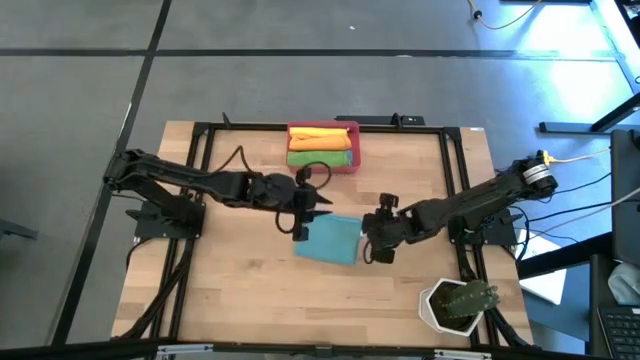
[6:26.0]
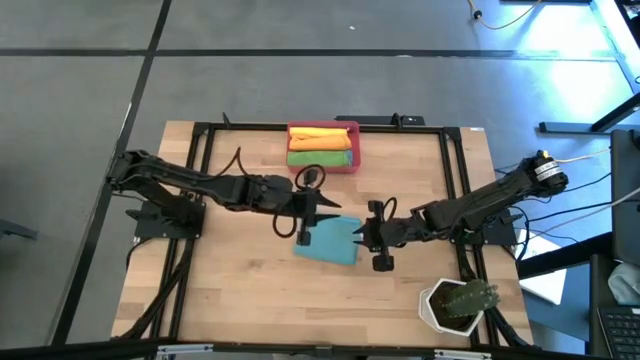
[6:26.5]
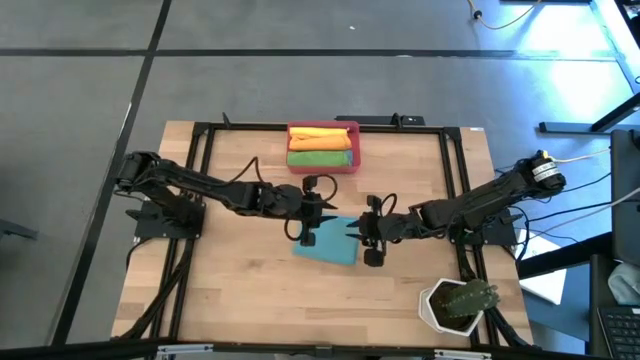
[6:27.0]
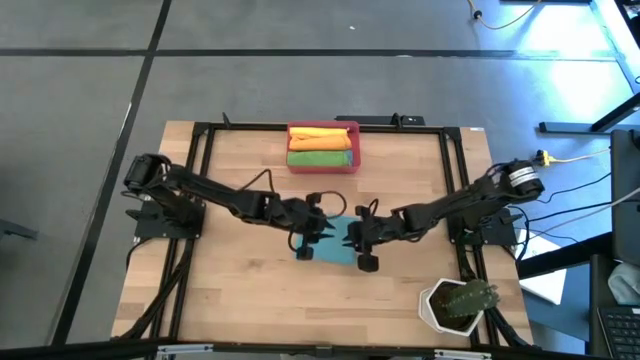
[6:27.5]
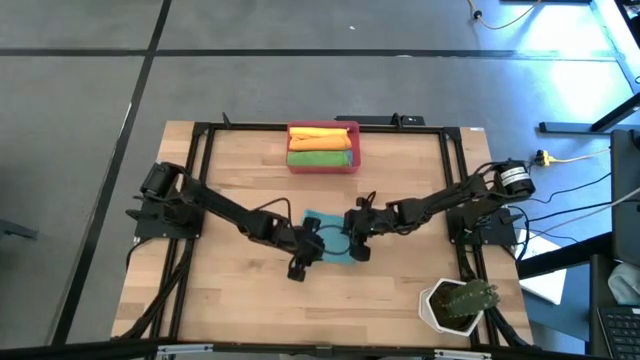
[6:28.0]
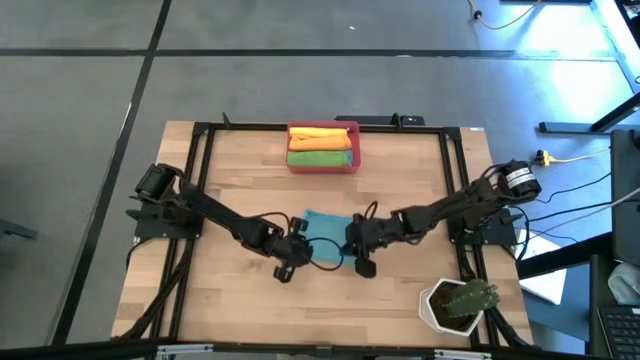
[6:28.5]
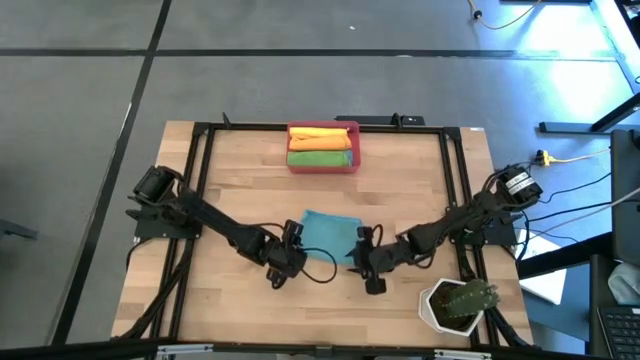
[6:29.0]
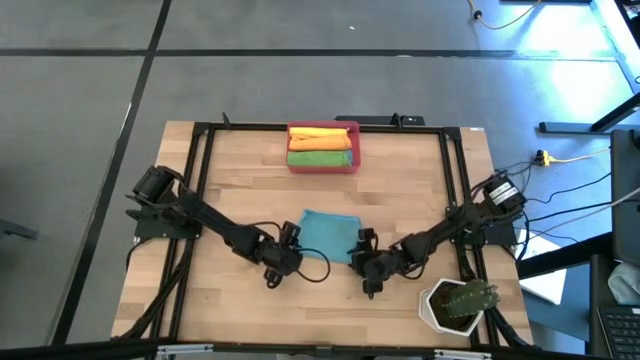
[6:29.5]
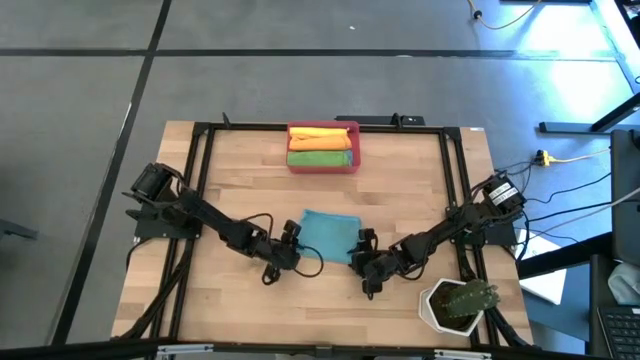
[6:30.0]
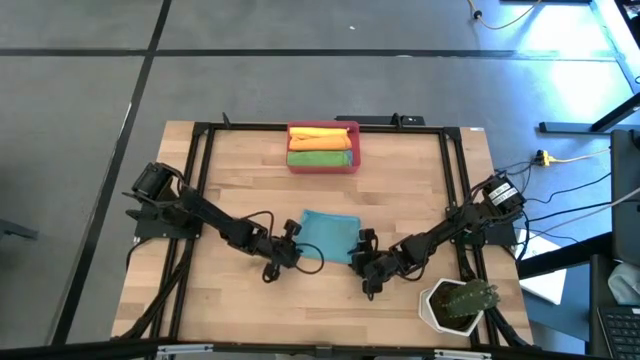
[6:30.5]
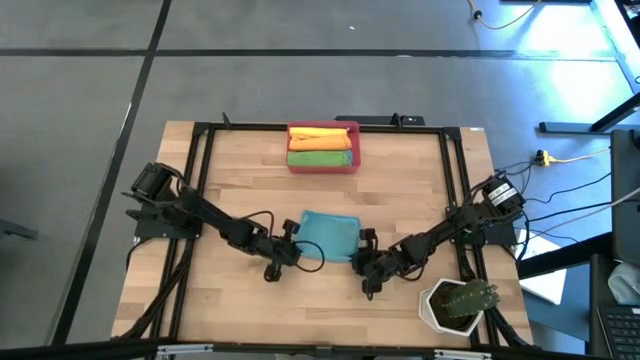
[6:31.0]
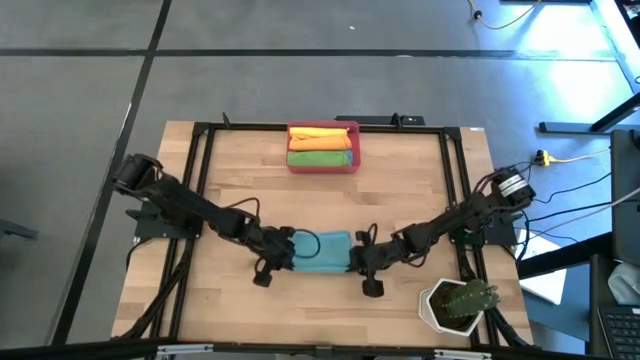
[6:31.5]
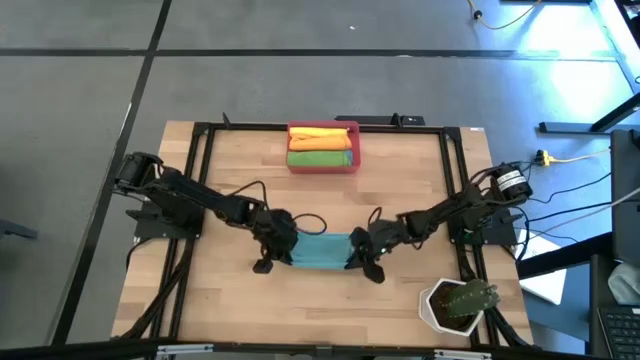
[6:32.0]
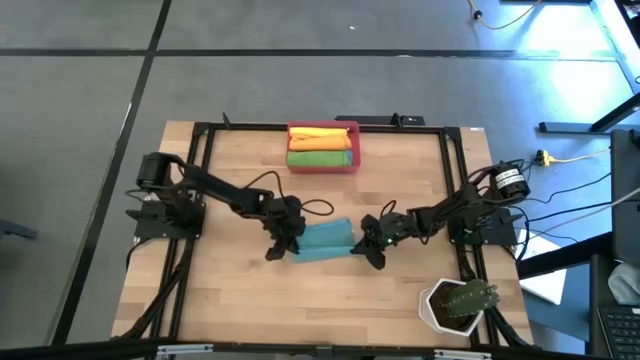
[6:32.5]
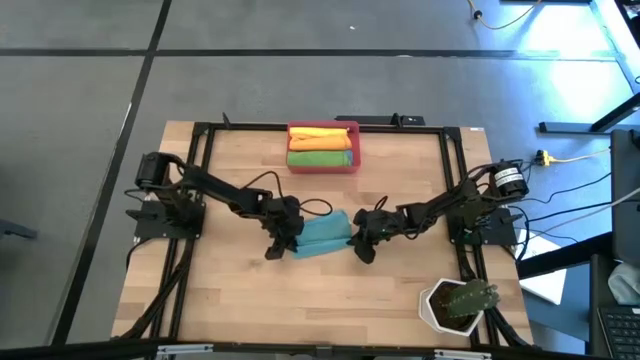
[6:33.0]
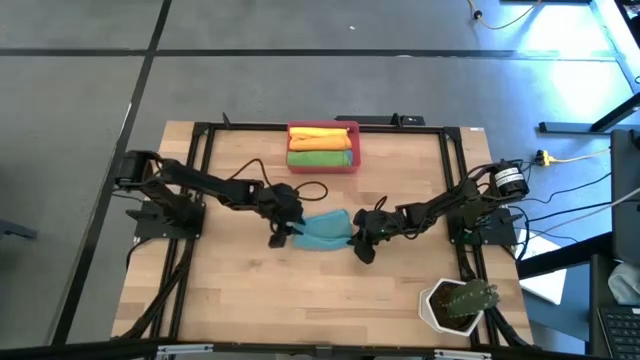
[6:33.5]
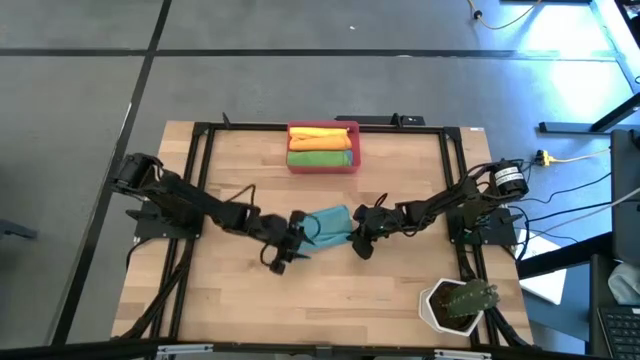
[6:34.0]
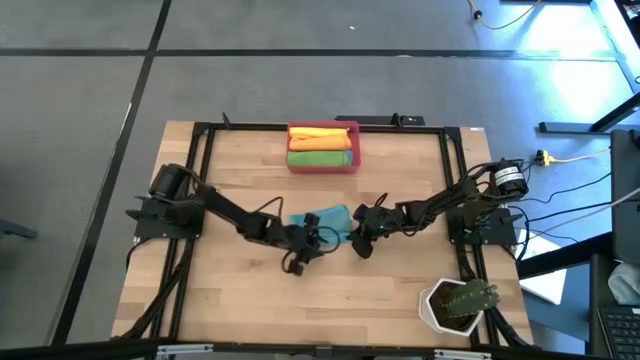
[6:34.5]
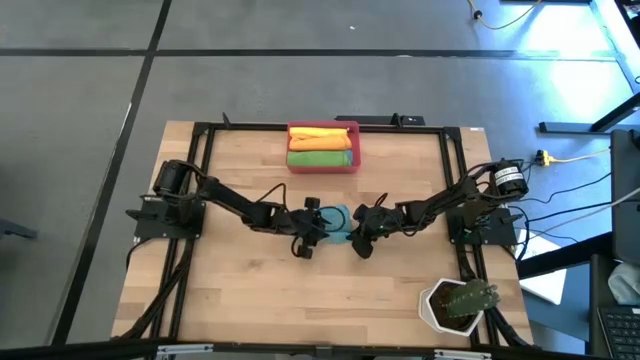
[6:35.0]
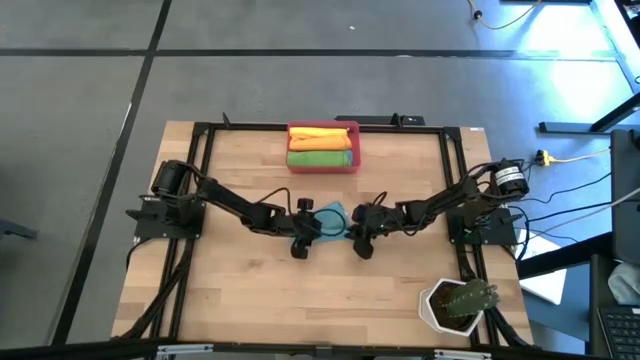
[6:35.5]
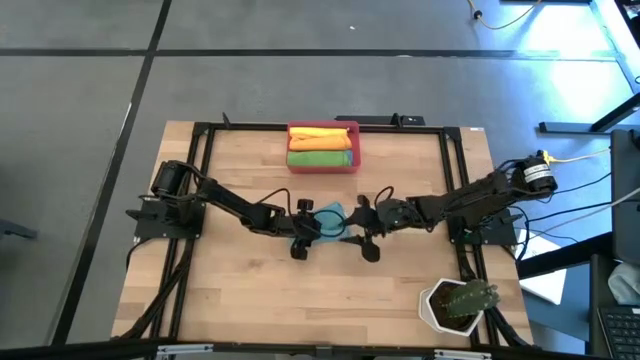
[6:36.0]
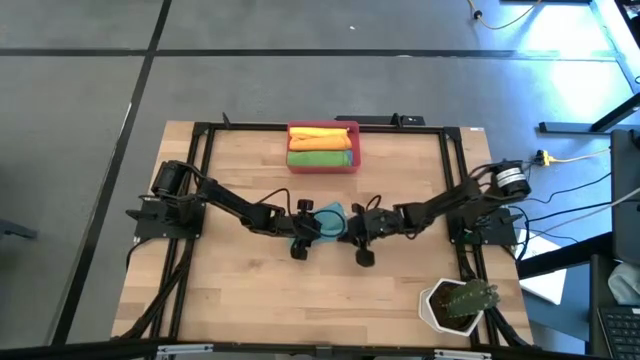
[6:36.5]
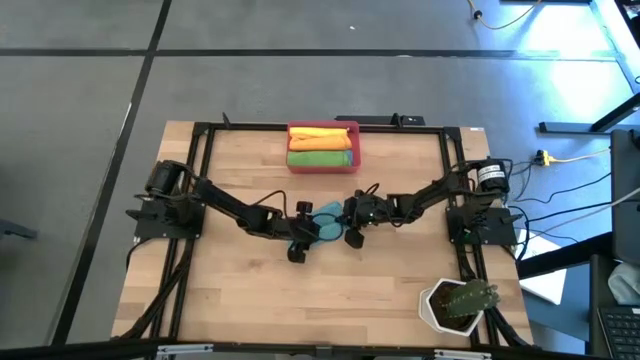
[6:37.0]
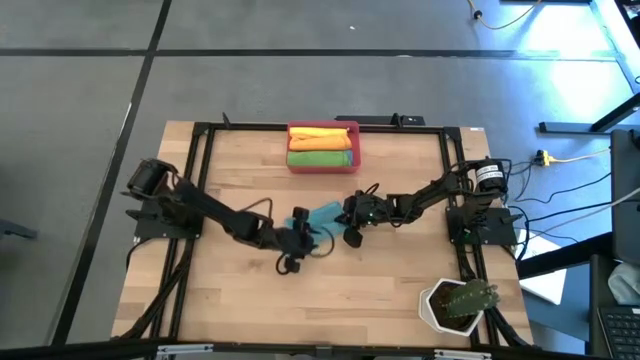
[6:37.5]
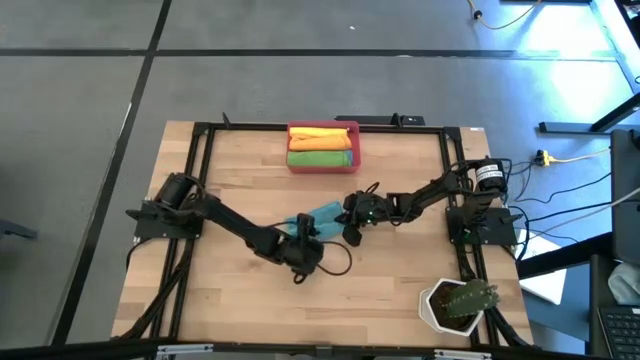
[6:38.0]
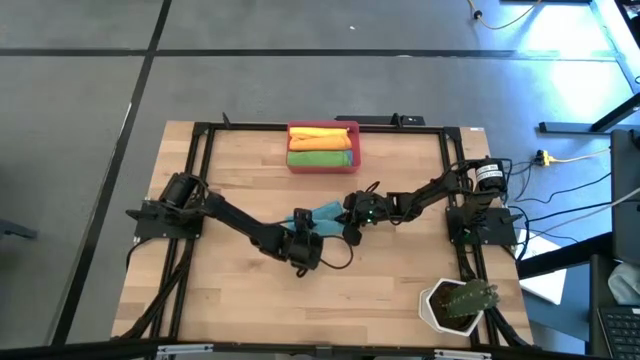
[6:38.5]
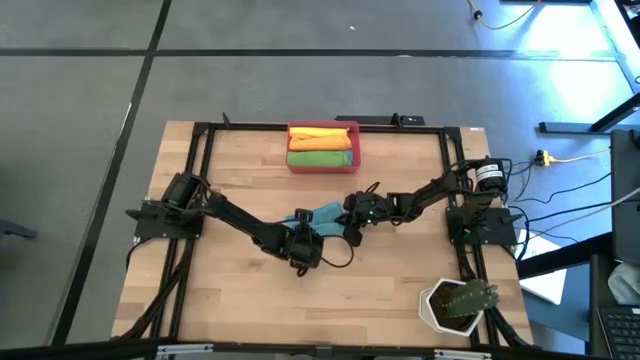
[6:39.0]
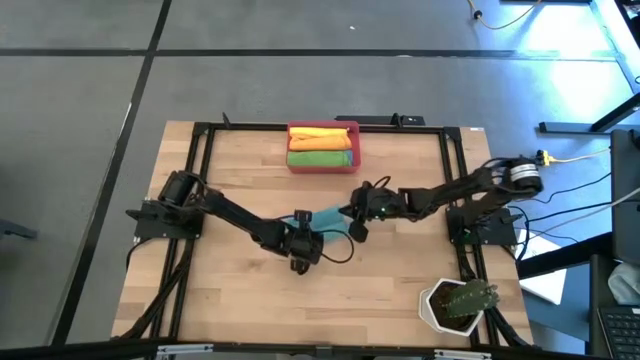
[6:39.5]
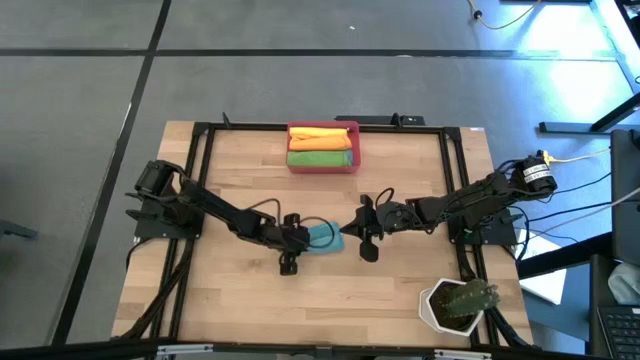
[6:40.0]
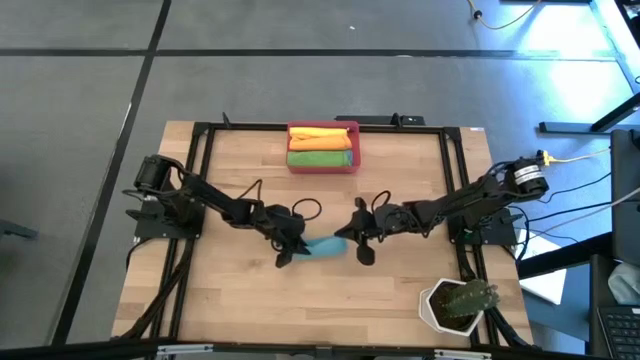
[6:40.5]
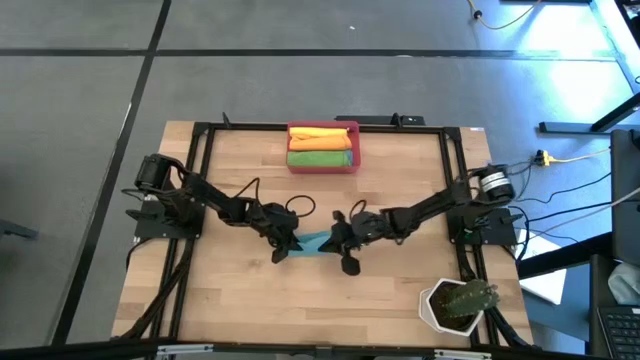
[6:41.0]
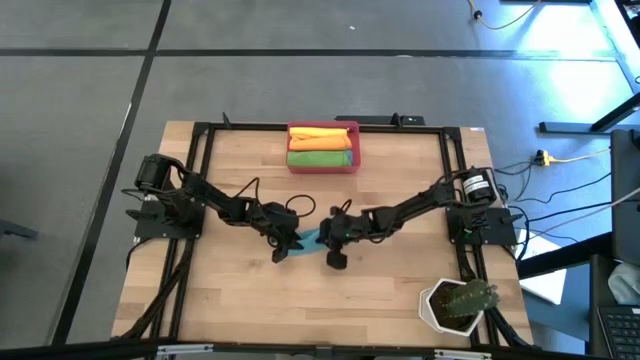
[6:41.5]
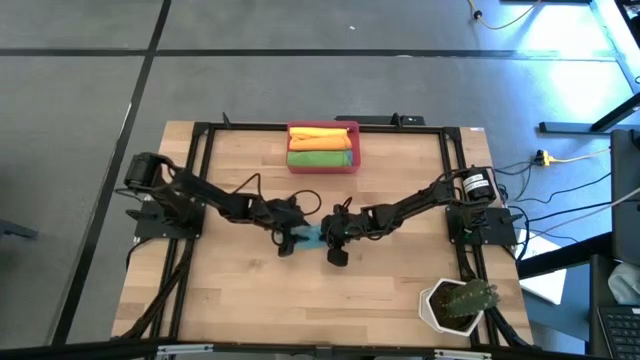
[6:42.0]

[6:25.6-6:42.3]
Task: Roll microfiber towels into tight, uniform cylinder then place into a basket
Roll the blue microfiber towel

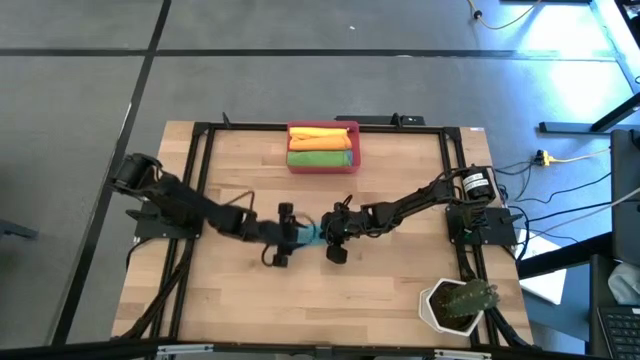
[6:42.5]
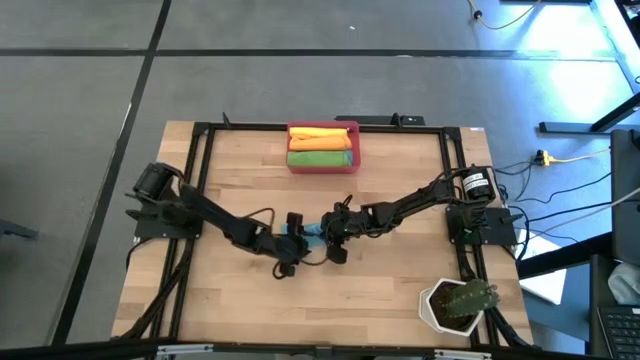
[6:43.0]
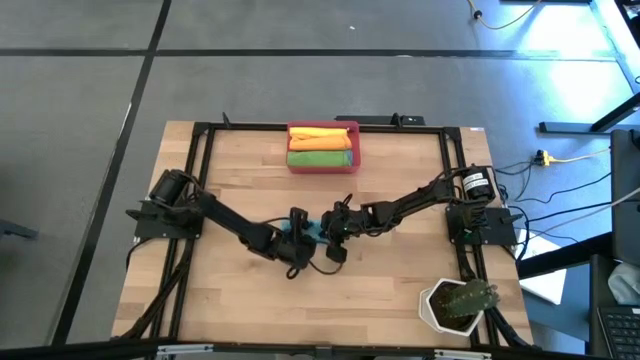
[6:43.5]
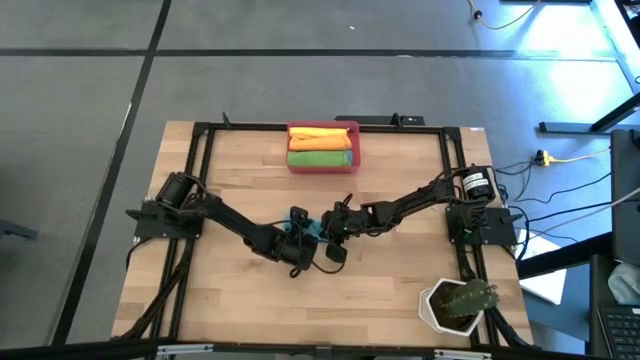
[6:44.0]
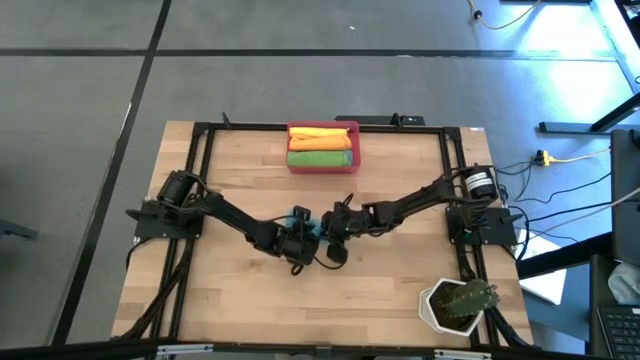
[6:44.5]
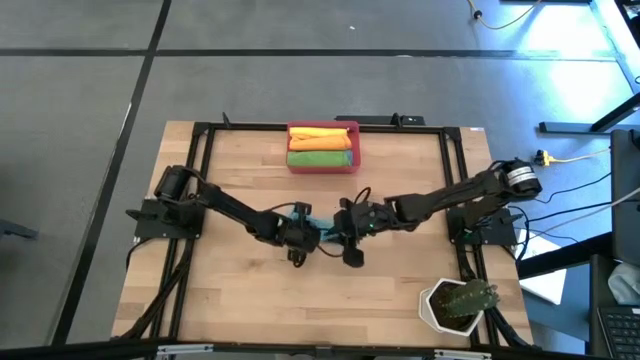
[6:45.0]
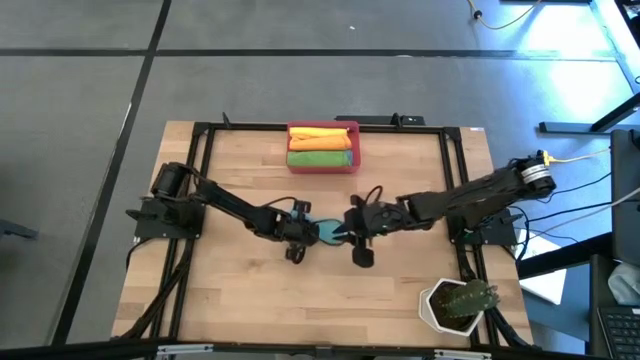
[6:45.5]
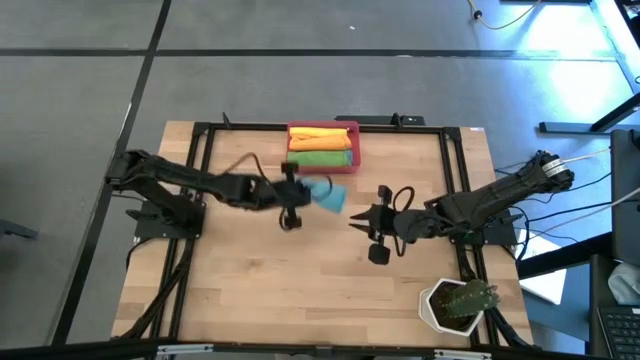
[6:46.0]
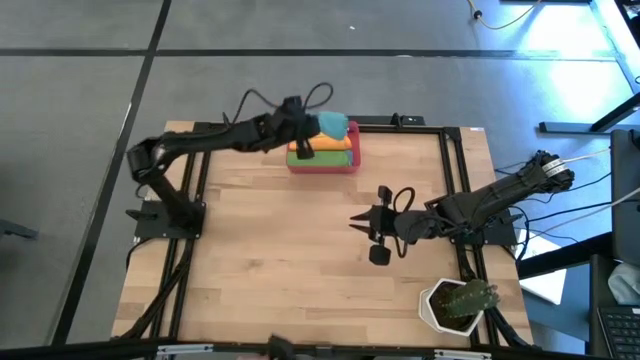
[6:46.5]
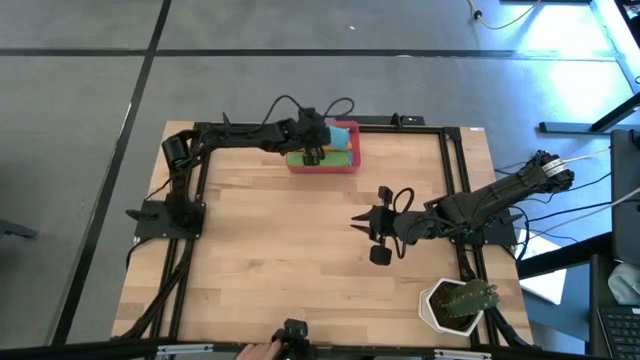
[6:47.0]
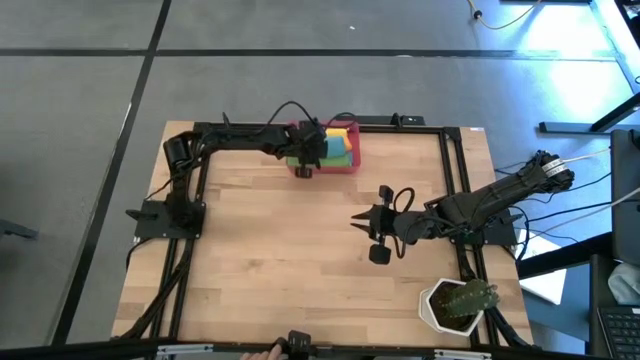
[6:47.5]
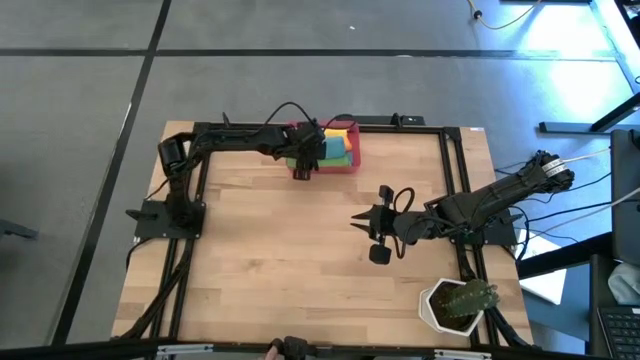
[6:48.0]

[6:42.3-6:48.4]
Put the blue microfiber towel into the red bin
